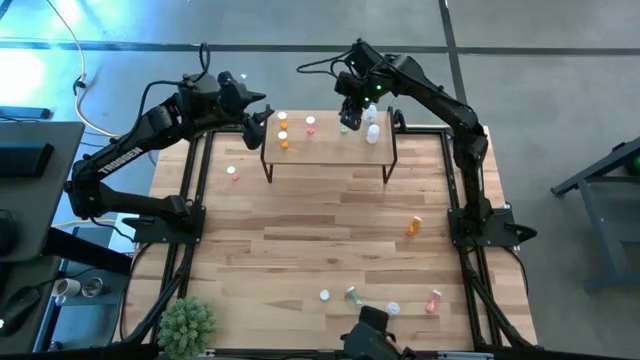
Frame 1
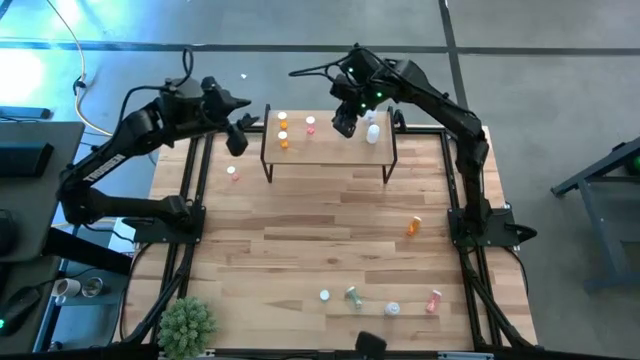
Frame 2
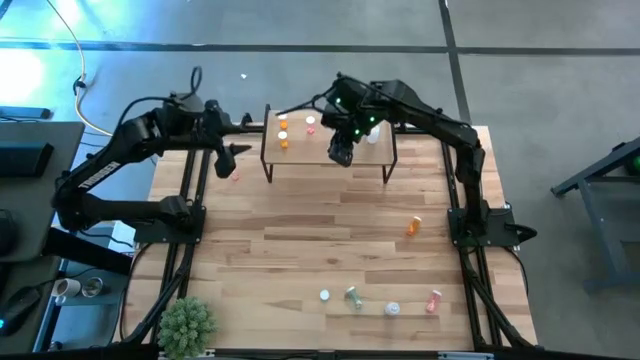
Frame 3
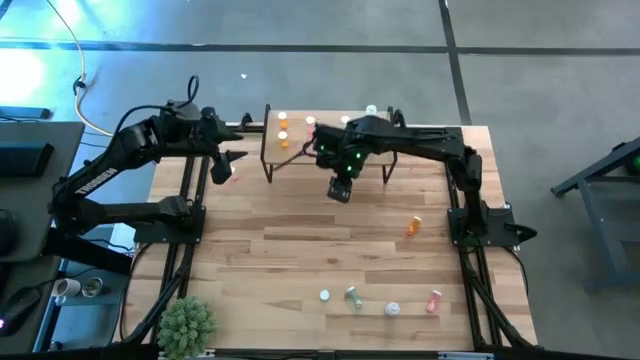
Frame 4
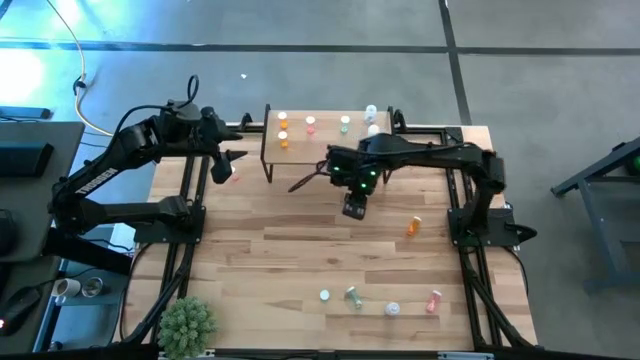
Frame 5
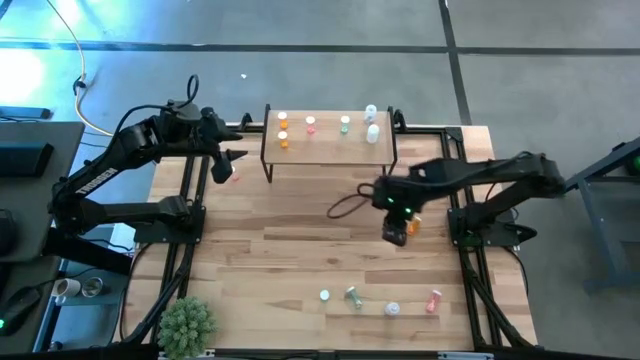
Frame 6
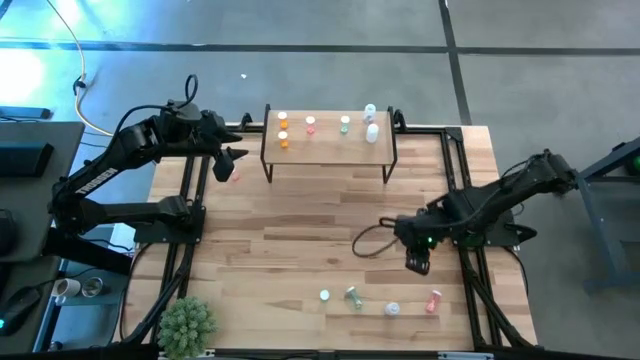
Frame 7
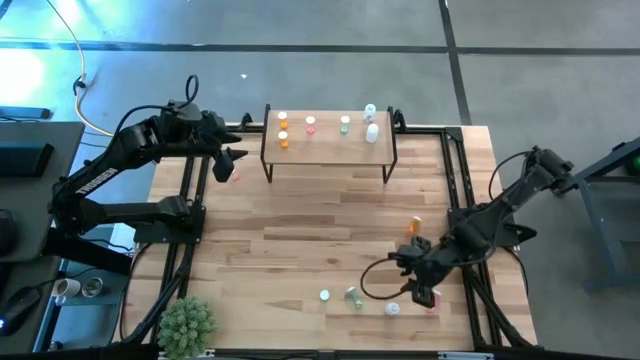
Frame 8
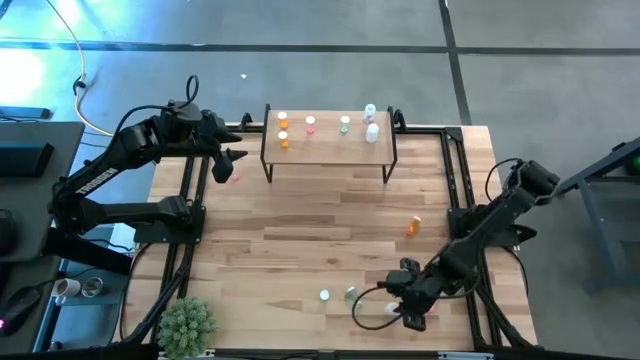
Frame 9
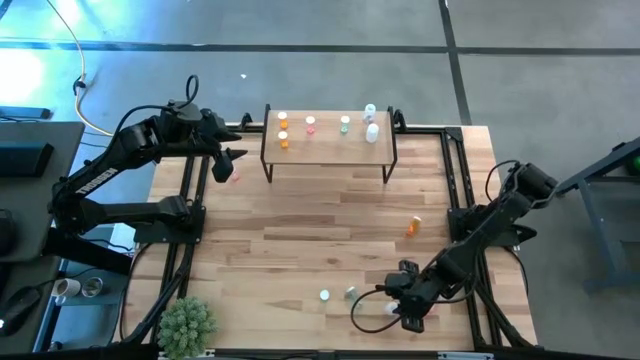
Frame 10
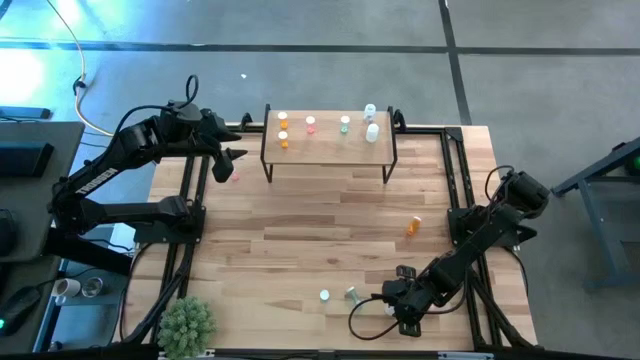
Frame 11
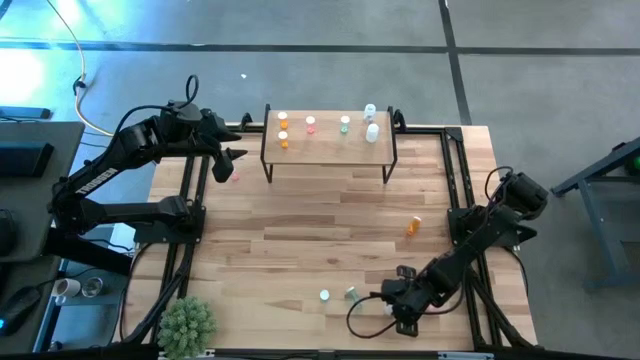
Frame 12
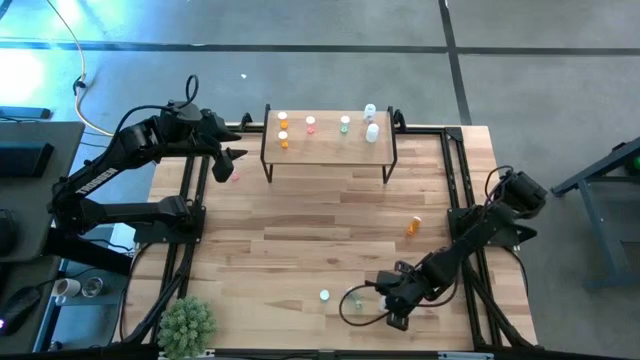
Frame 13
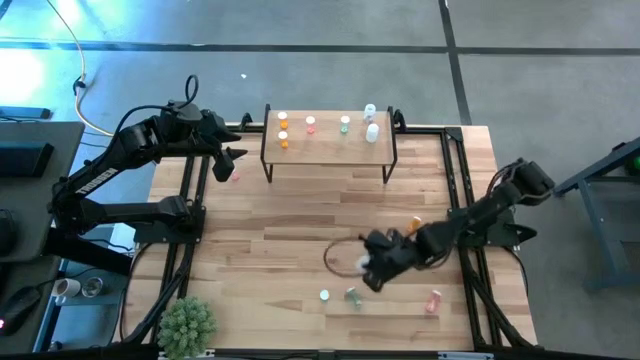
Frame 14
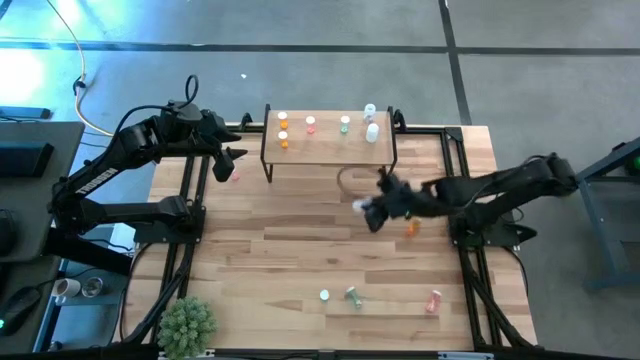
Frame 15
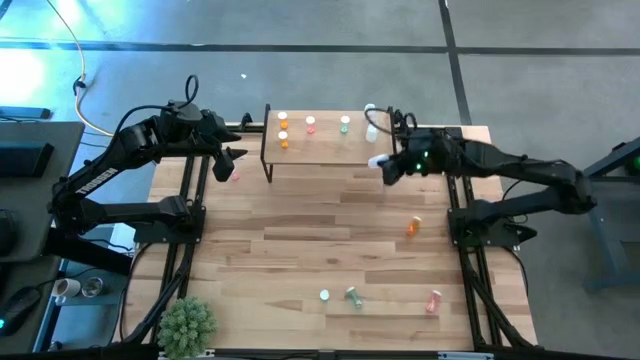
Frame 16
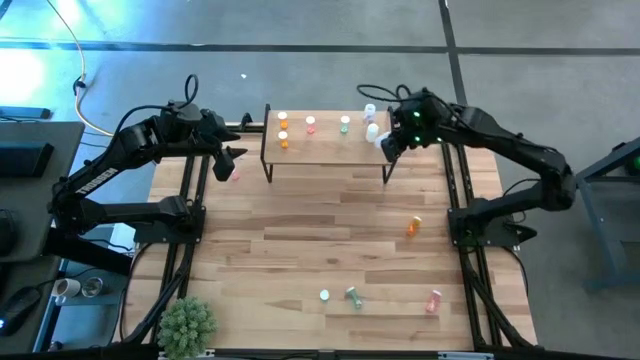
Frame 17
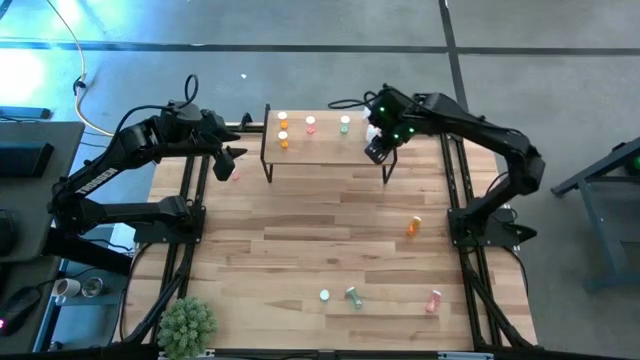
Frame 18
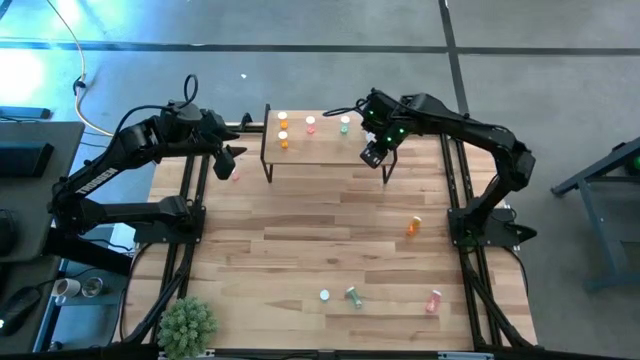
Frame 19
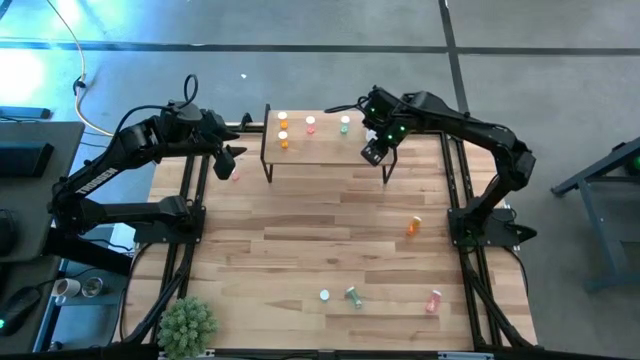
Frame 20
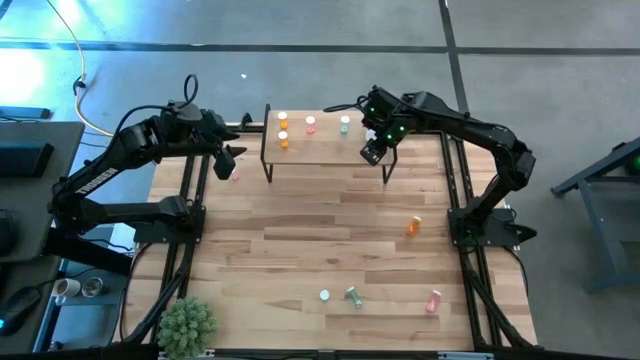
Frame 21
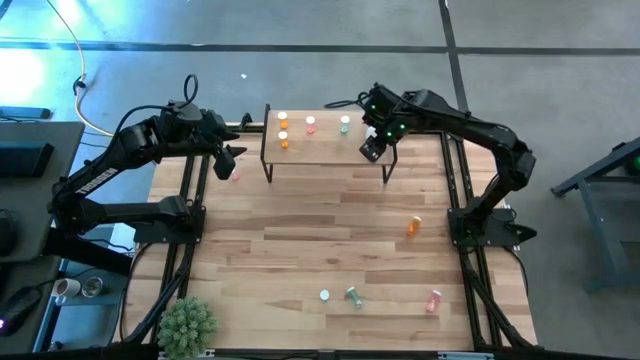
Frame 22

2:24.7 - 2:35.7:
Task: Pick and place medicine bottles onto shelf by color
Put the transparent pill bottle on the shelf aligned with the transparent bill bottle

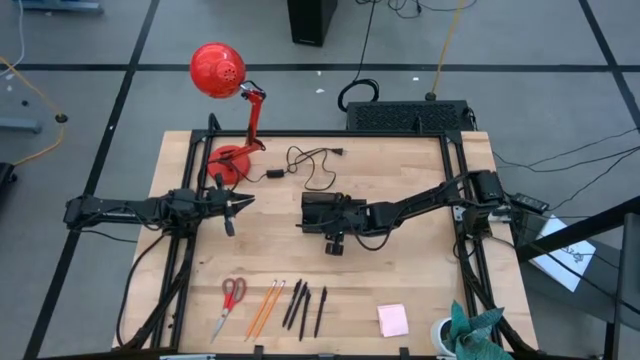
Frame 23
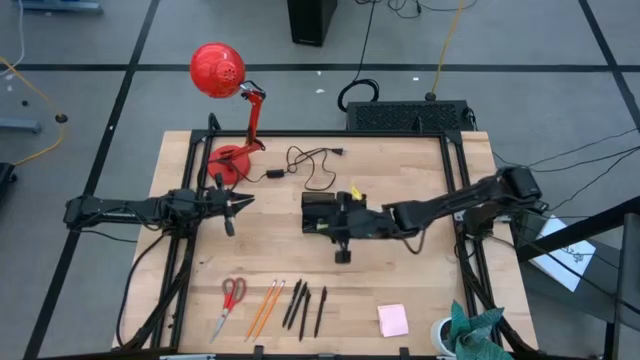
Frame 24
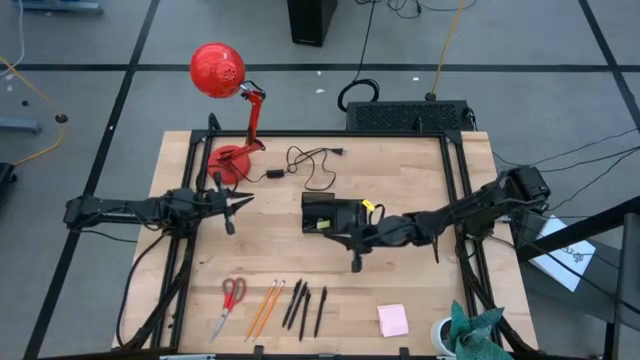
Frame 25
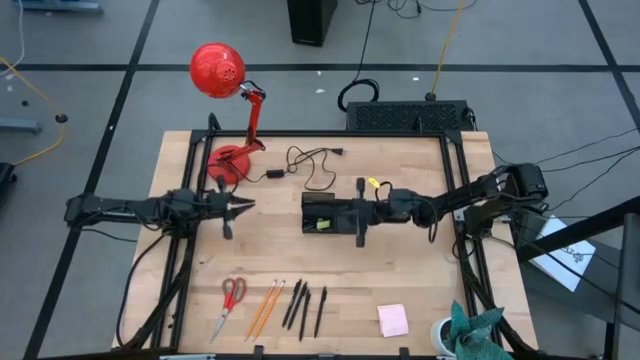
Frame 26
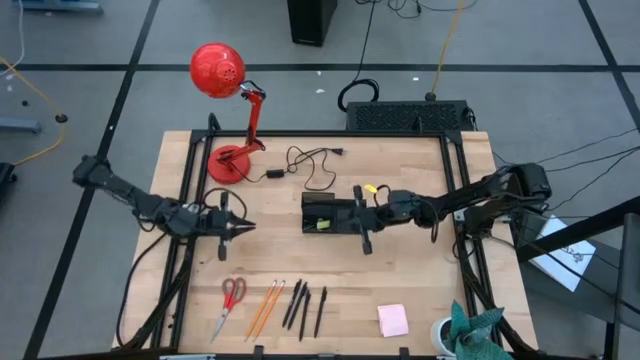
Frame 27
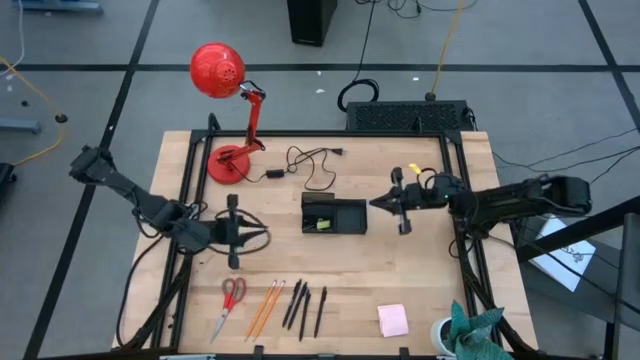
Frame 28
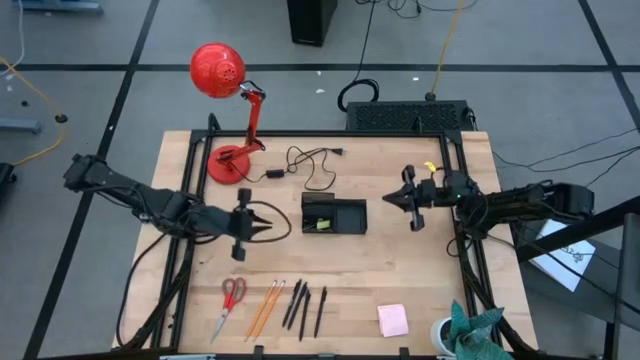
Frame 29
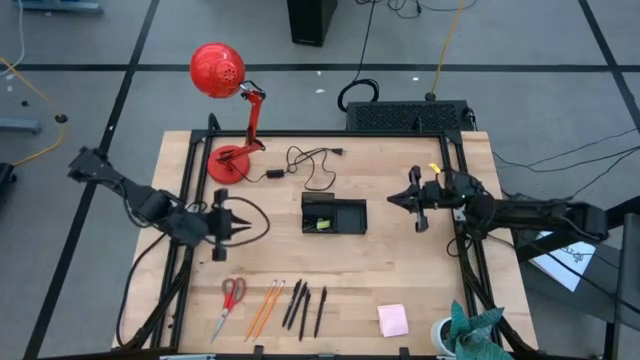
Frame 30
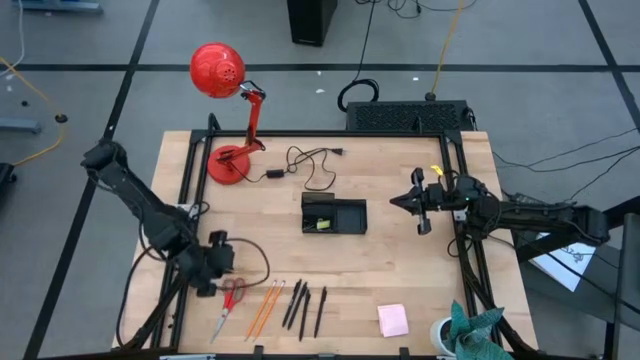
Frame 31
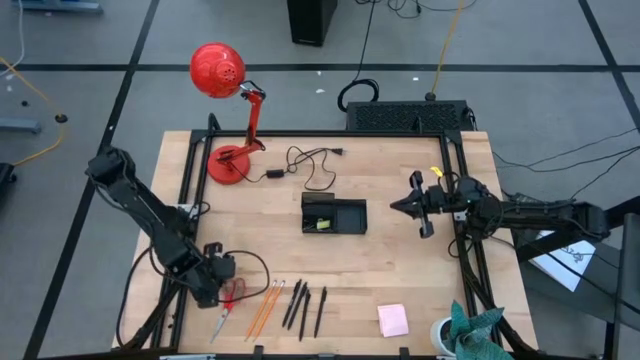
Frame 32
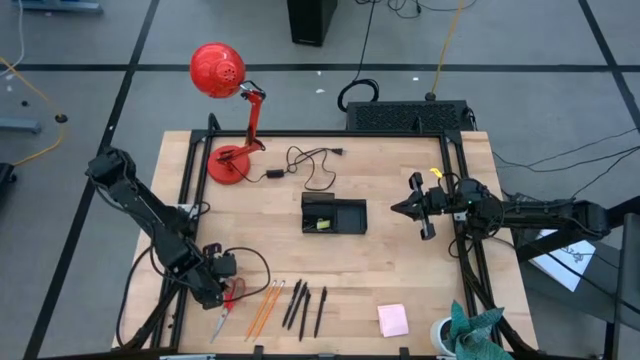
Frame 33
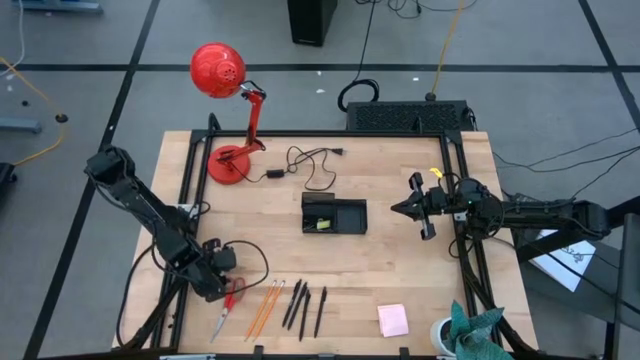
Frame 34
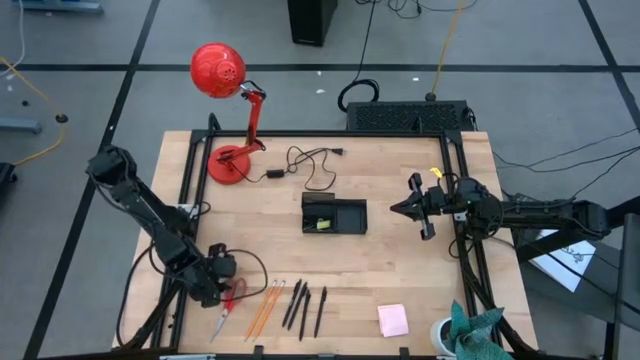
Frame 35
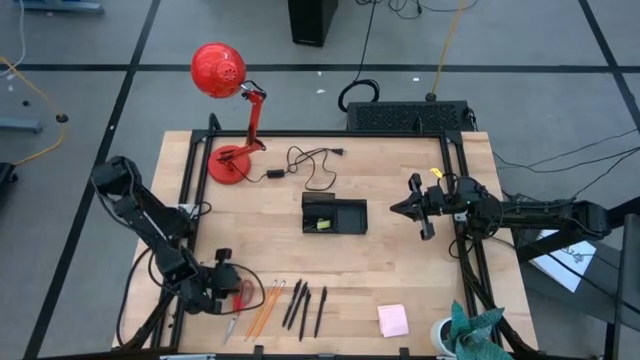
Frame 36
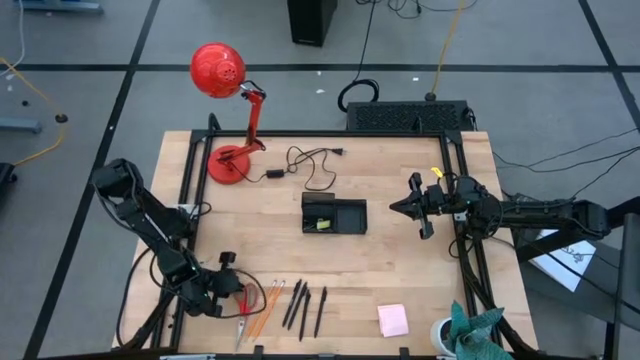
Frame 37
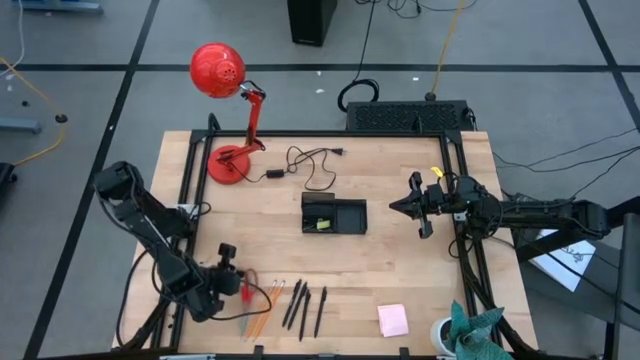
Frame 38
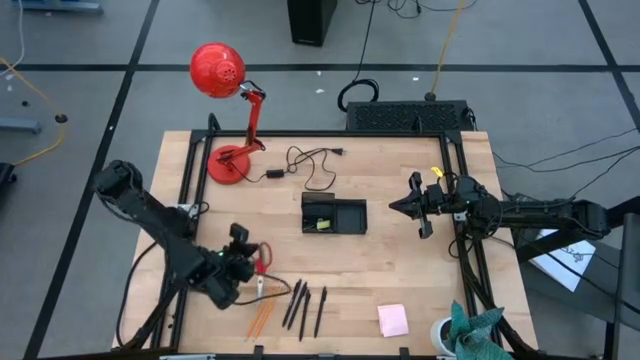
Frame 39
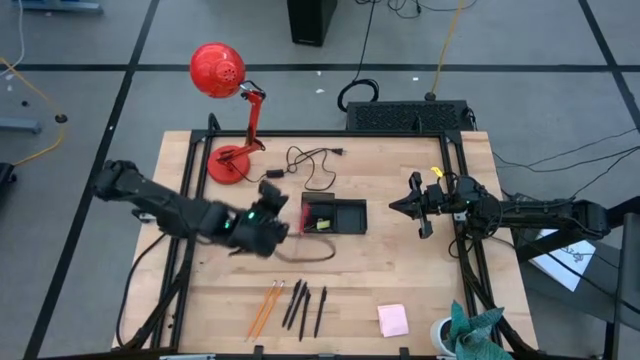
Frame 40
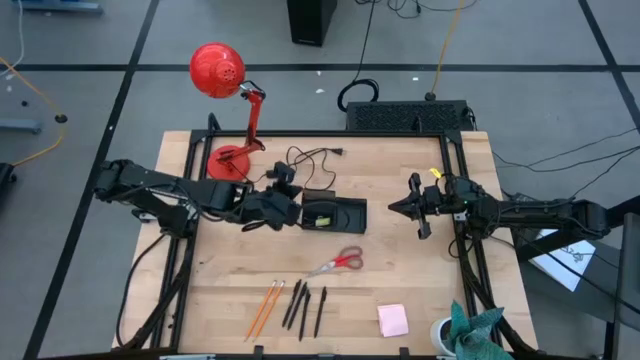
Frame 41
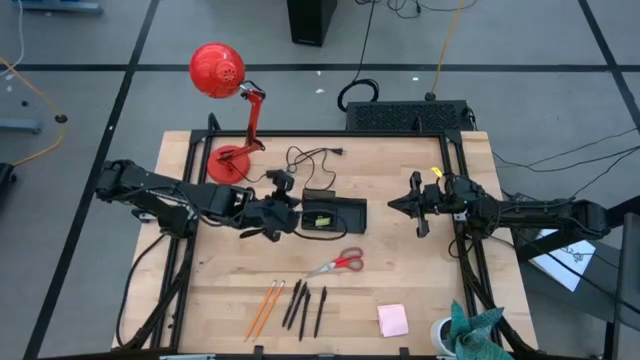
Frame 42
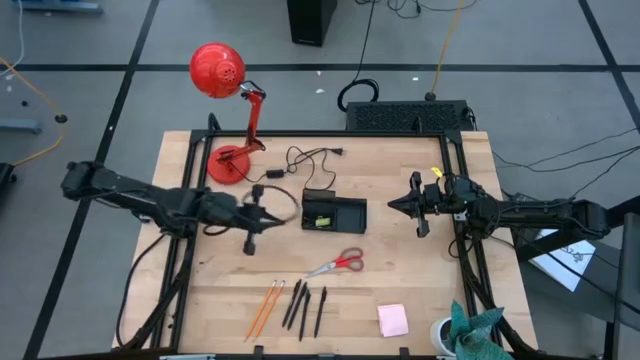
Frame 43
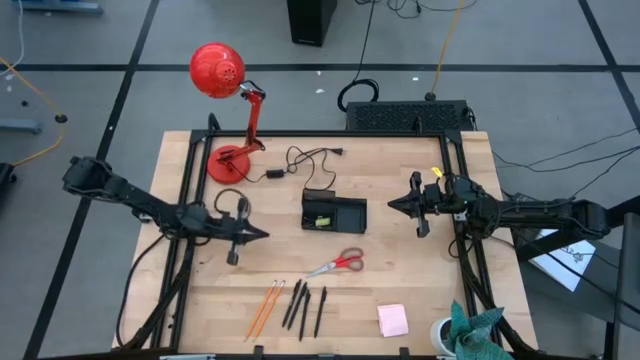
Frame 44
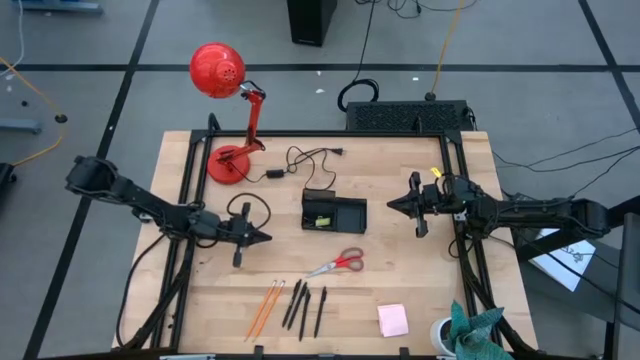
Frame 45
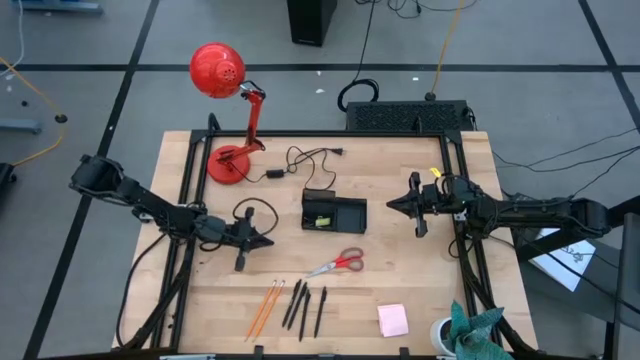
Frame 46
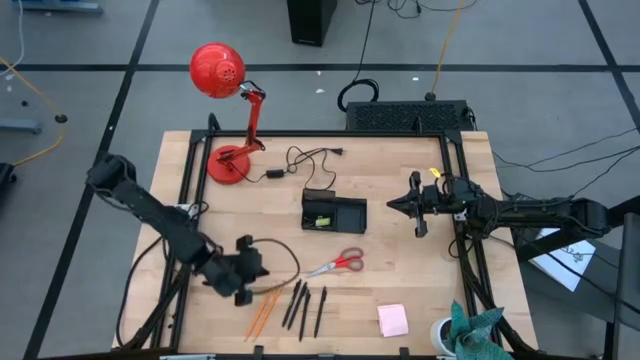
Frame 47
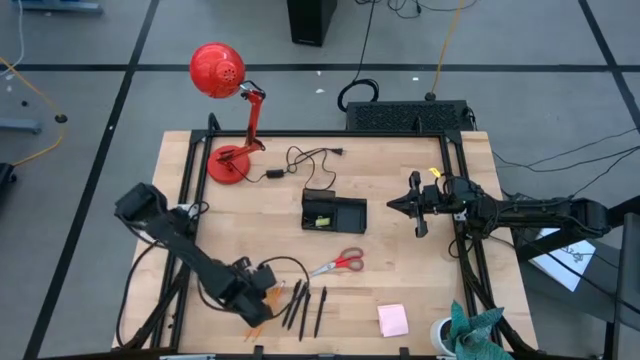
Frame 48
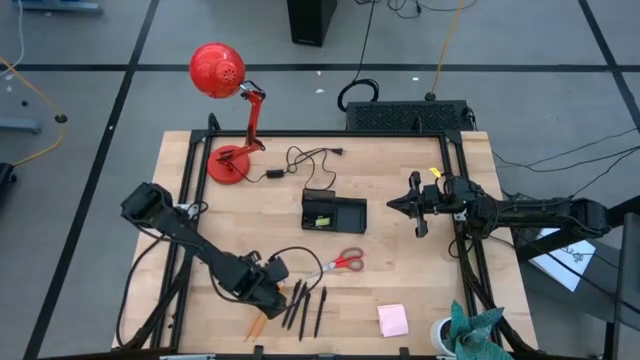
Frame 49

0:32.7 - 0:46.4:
Task: Pick and place office supplies into organizer
Put the red scissor into the black desk organizer
